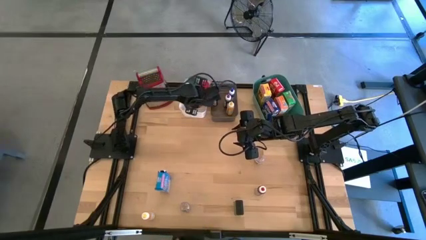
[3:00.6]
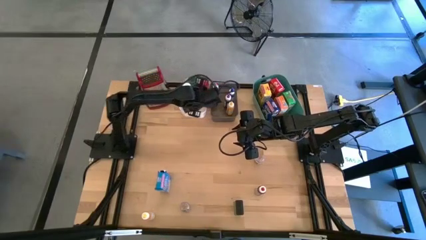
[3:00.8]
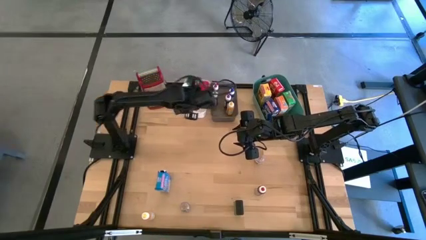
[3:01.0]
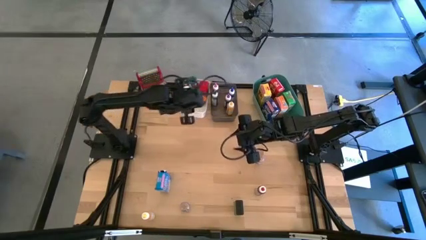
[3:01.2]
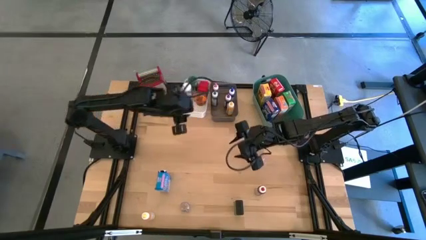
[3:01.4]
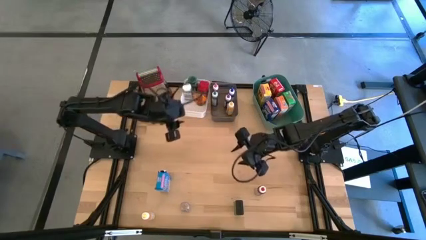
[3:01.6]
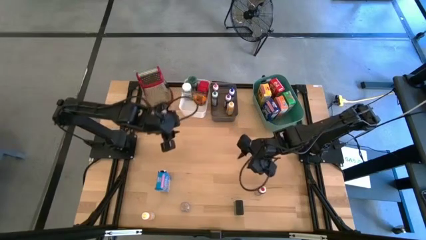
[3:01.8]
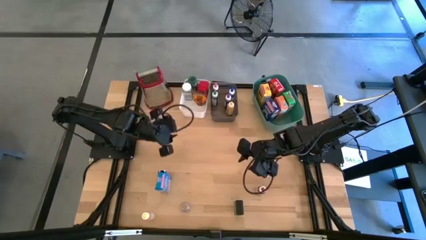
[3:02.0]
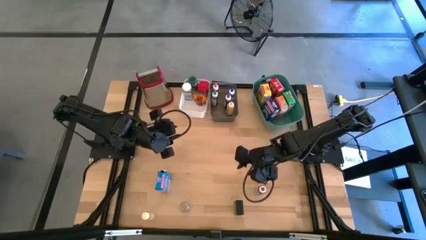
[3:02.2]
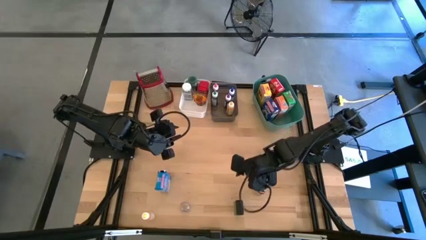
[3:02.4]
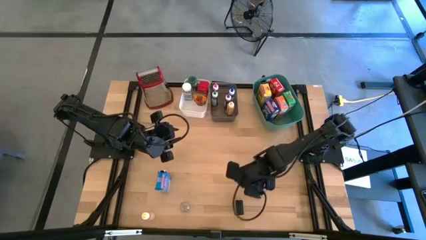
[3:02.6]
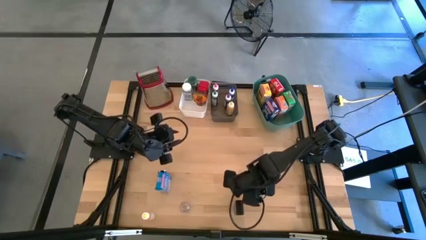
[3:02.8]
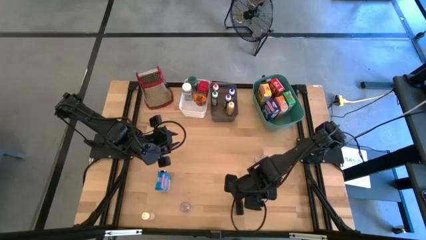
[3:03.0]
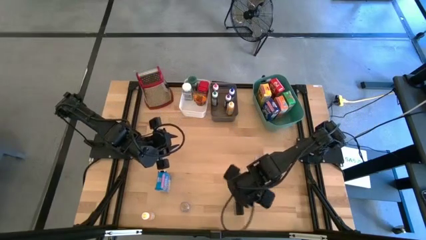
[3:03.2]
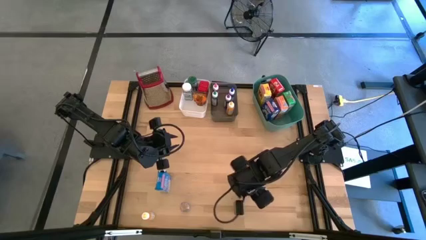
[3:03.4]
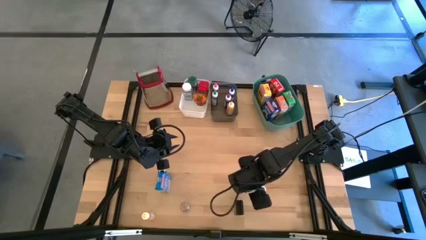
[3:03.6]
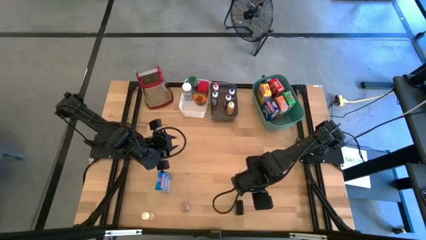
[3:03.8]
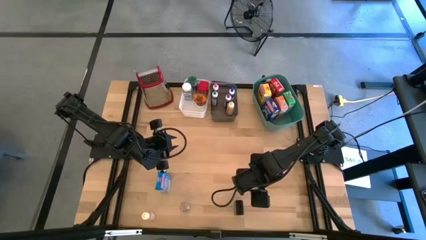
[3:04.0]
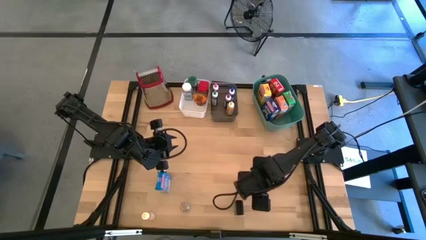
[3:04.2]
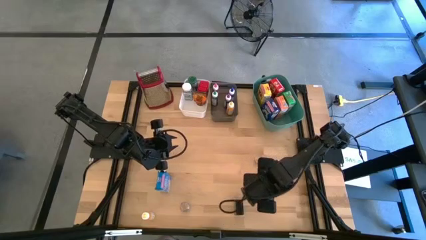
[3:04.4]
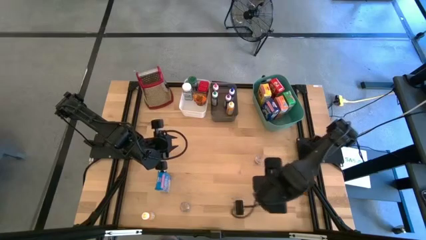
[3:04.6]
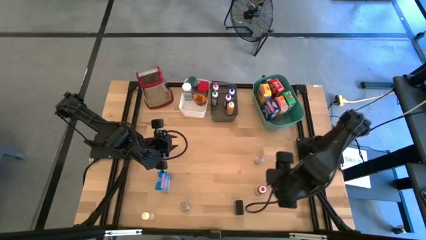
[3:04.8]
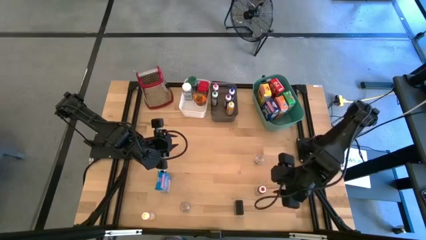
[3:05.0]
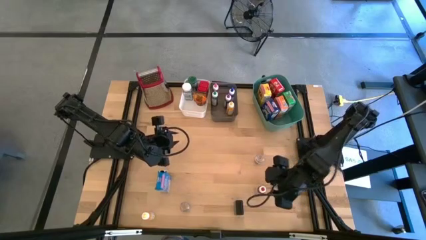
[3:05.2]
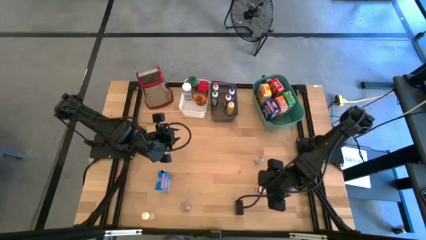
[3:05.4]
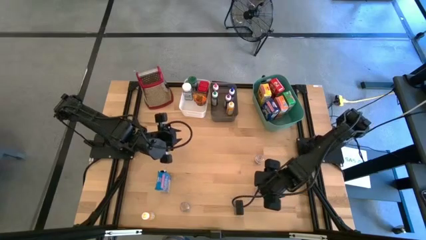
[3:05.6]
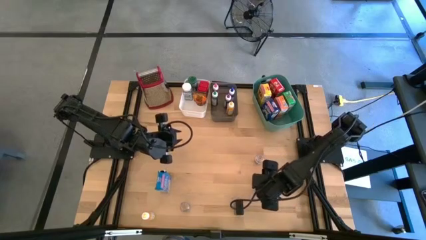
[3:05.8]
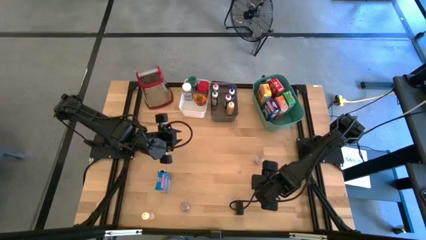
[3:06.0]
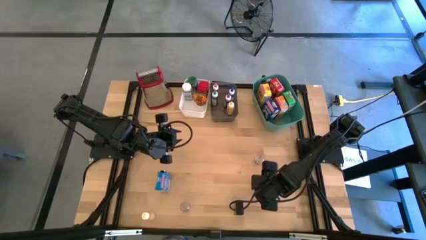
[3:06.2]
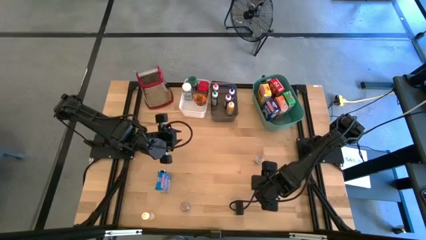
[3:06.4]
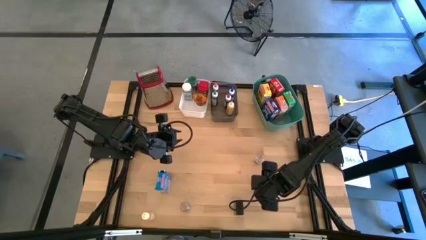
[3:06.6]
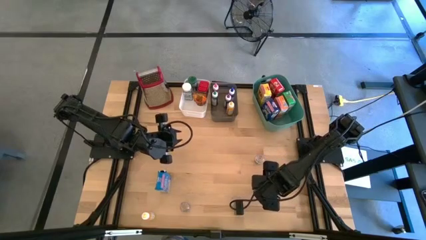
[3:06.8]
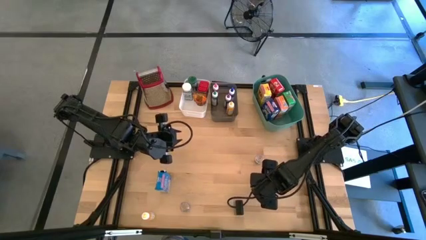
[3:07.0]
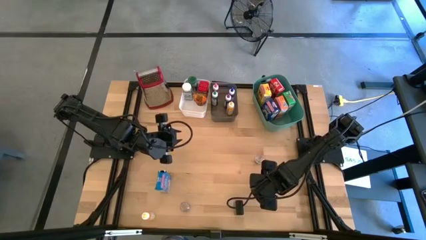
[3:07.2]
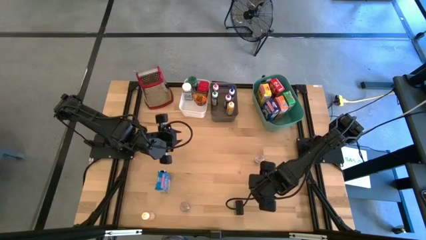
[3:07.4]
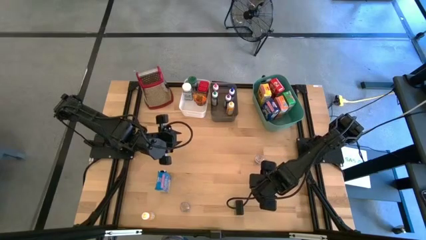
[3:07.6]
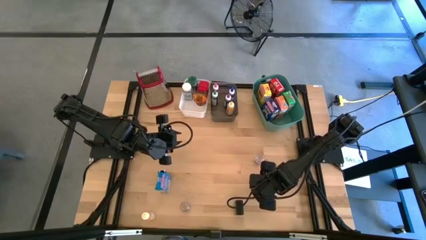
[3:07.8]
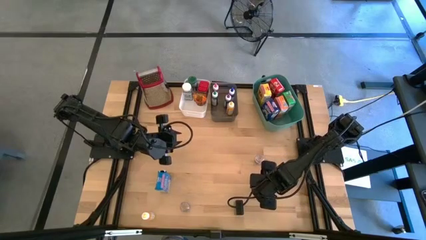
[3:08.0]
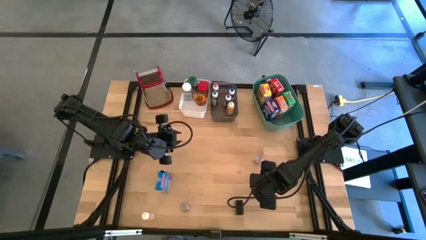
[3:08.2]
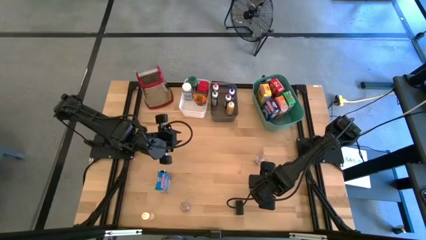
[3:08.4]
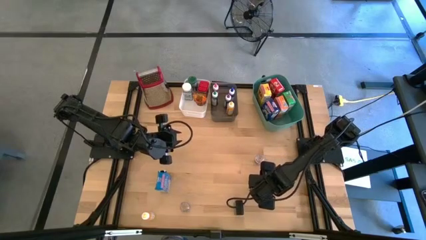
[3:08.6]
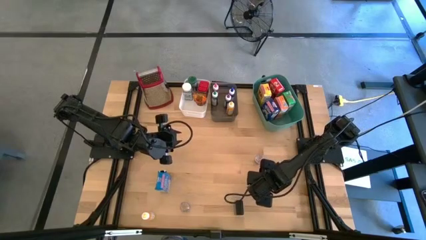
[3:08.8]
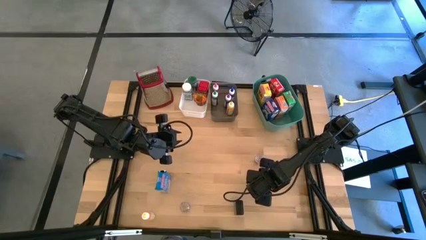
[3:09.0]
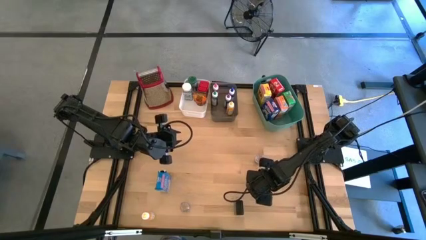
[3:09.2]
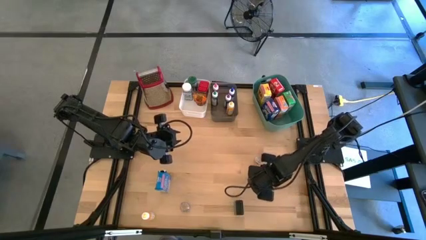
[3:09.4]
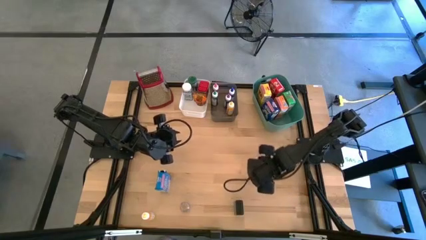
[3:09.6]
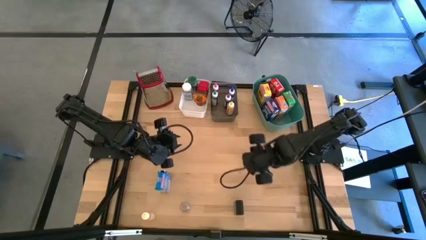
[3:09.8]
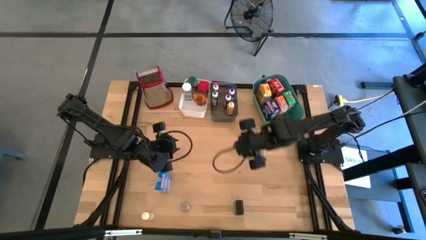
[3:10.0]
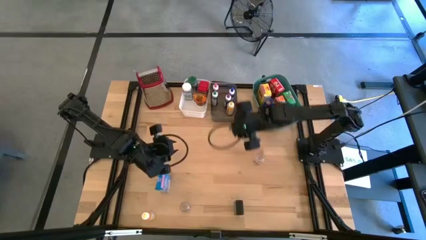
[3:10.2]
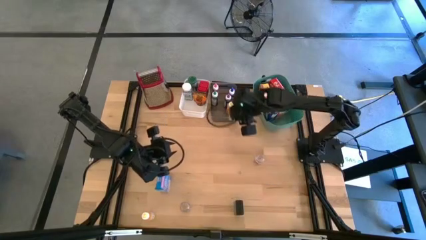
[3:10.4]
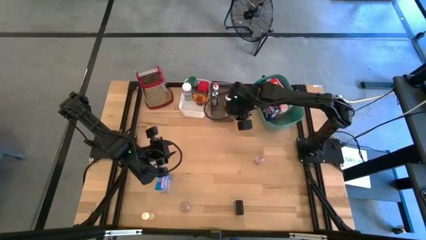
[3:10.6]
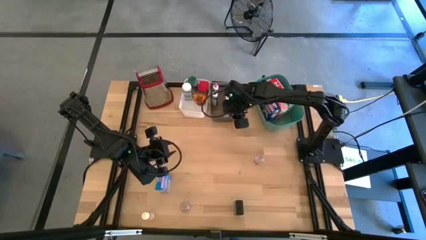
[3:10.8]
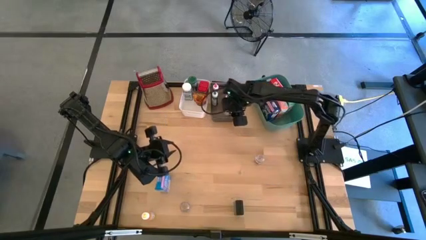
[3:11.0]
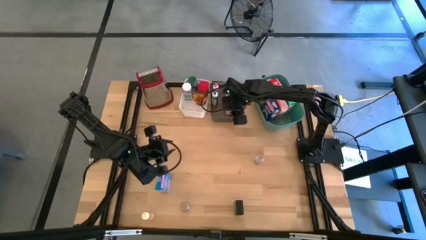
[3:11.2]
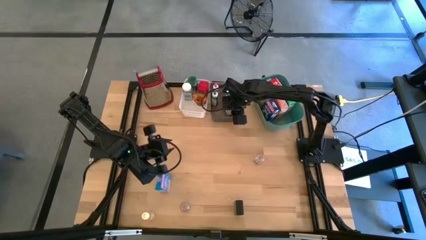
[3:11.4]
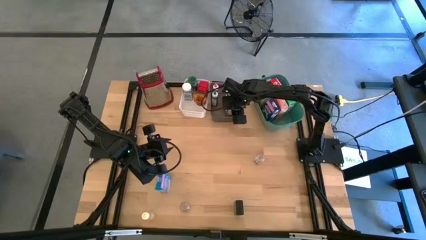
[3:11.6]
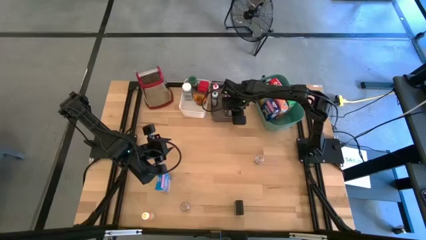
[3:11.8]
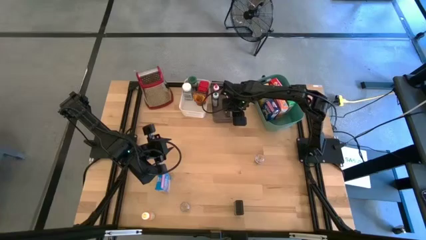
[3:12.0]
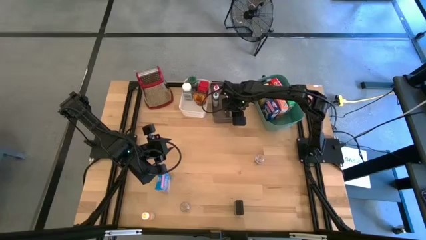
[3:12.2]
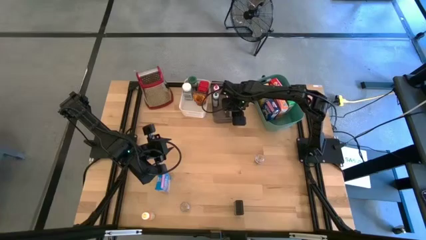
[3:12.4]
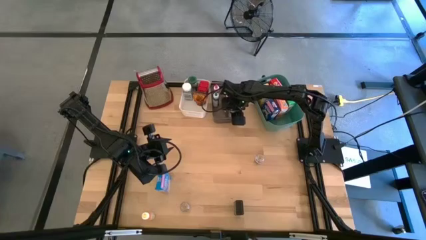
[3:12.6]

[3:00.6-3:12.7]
Task: Pick & Place Kitchen Items
Put the red food coloring bottle into the black bin

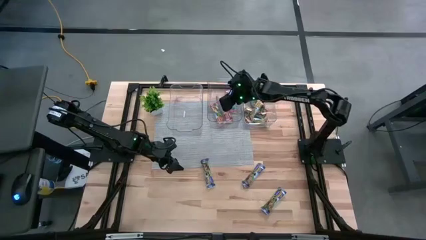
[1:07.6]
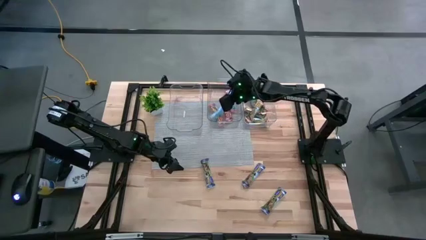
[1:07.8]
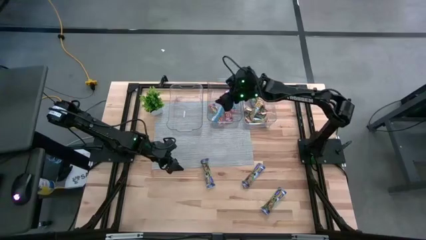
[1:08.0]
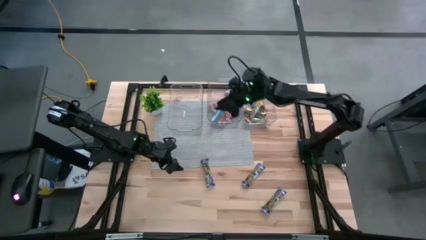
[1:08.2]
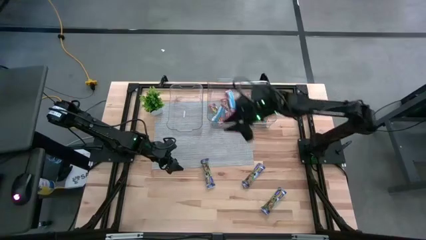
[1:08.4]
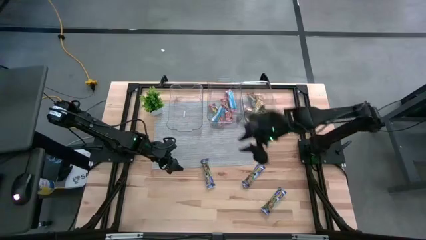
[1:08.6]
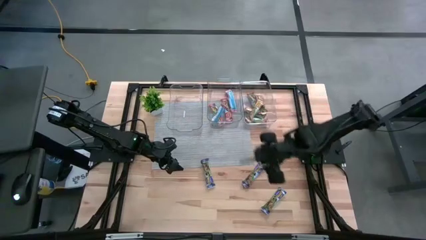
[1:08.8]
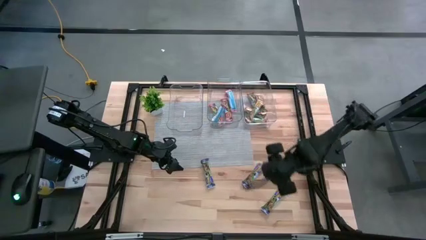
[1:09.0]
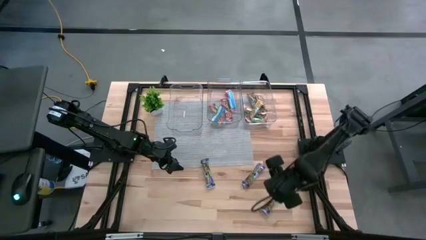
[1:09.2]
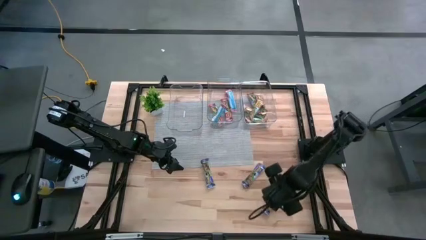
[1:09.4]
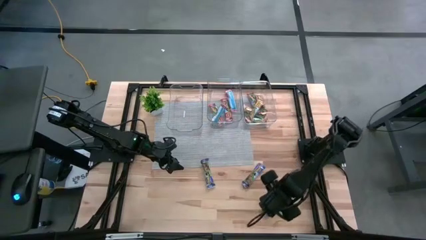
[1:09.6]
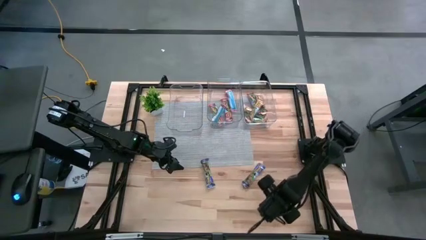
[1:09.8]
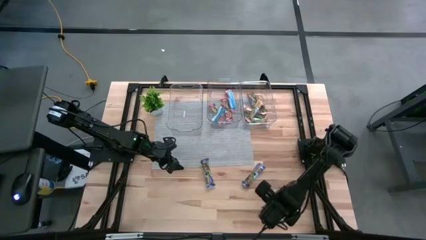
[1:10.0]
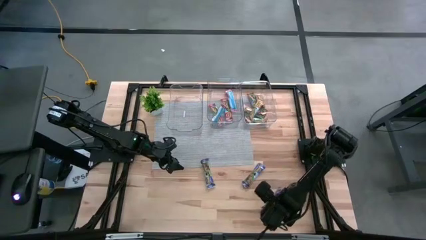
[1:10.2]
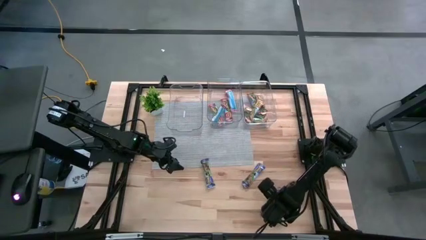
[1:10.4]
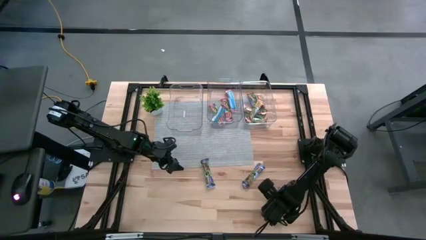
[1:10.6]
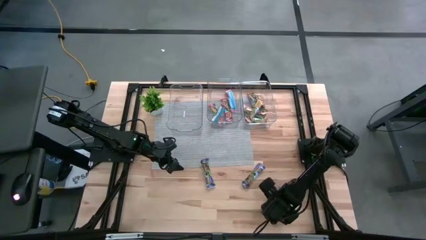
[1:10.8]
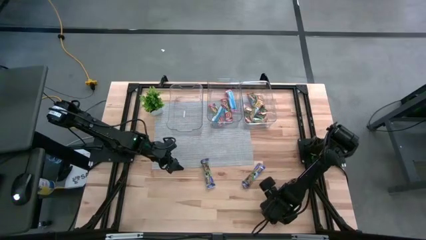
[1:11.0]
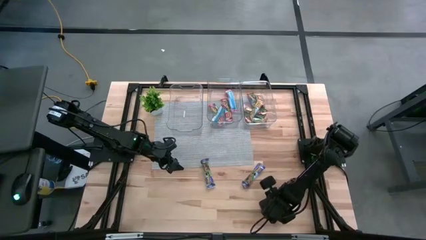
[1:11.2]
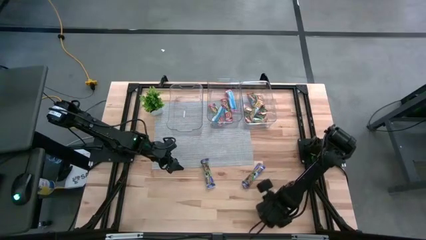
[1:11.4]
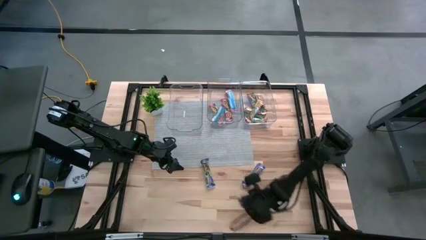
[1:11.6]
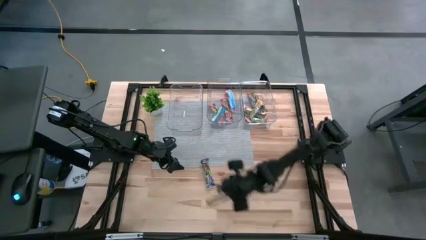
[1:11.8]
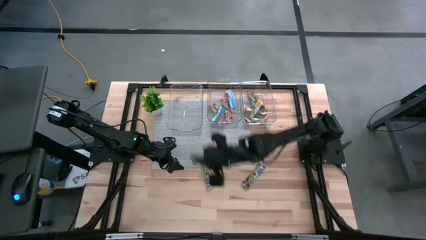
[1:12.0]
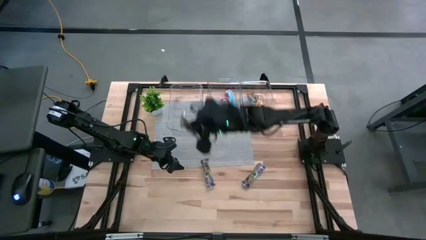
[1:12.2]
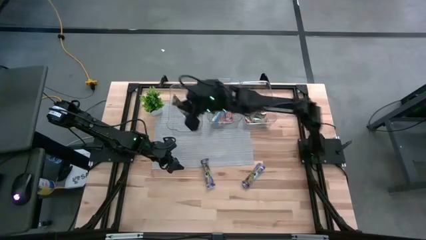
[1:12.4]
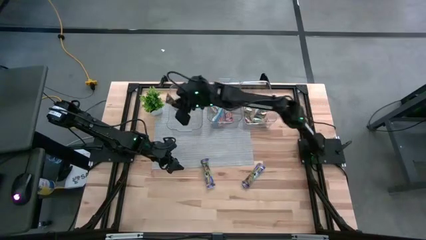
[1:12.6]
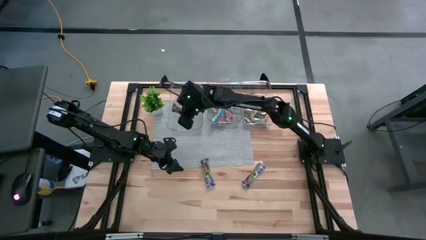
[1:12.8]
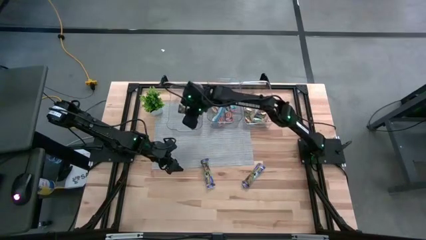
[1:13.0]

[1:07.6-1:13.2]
Task: Pick and place Granola Bars by type
Put the blue granola bar into the left transparent bin
